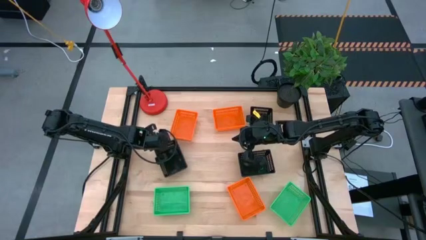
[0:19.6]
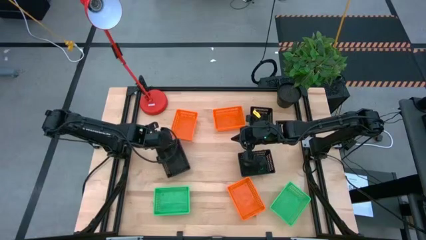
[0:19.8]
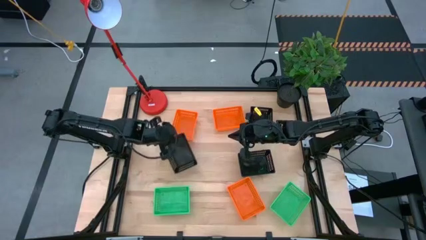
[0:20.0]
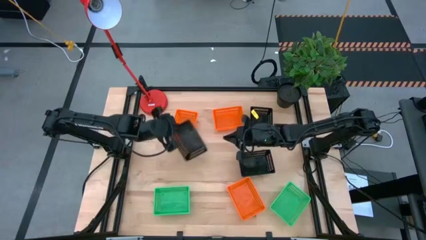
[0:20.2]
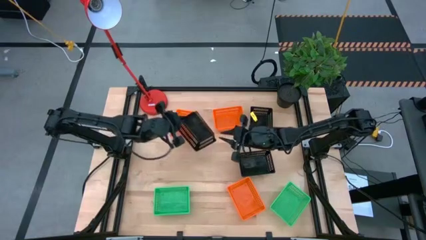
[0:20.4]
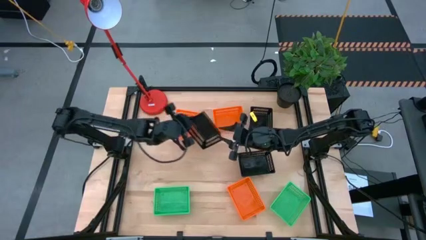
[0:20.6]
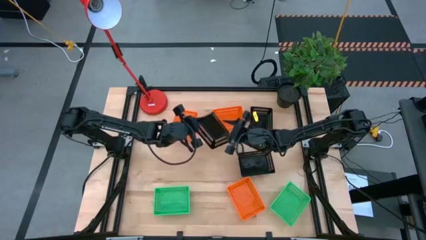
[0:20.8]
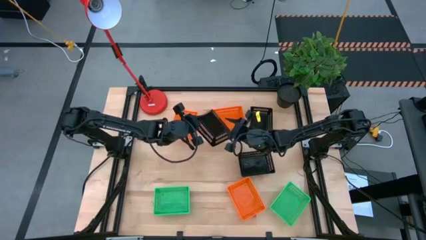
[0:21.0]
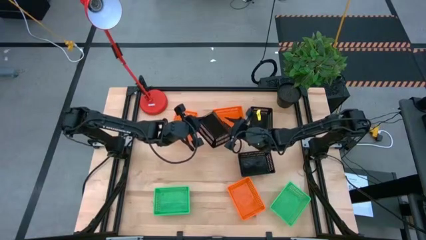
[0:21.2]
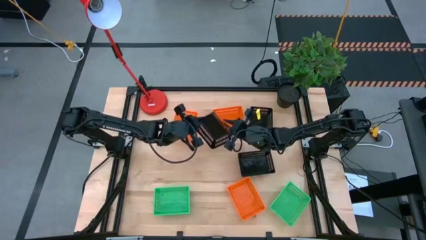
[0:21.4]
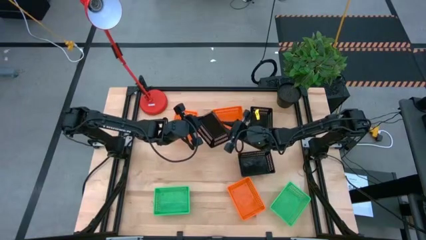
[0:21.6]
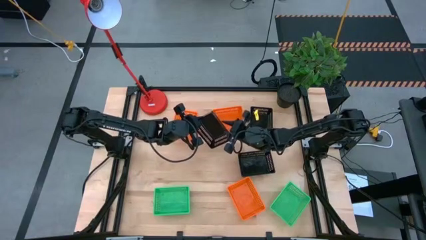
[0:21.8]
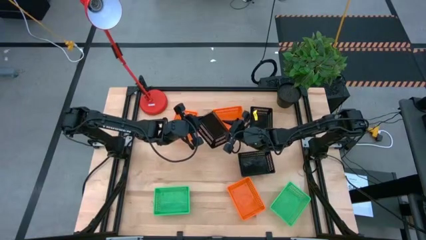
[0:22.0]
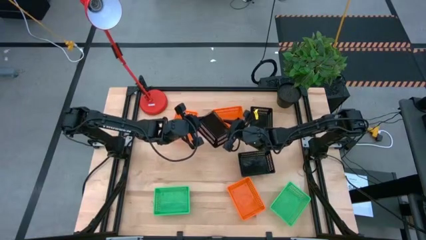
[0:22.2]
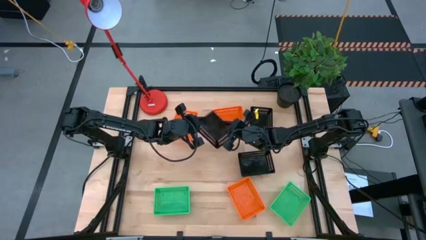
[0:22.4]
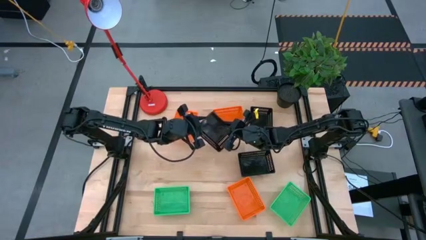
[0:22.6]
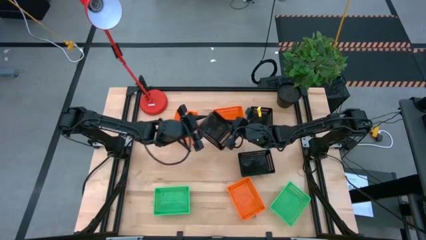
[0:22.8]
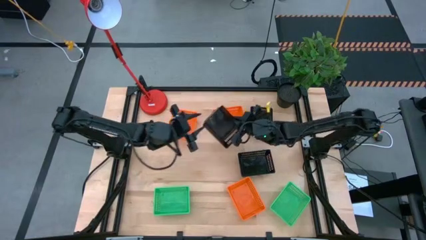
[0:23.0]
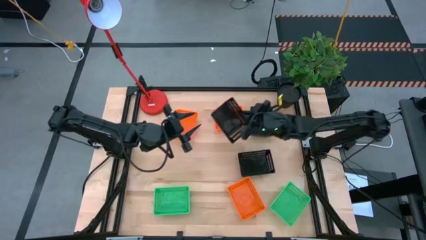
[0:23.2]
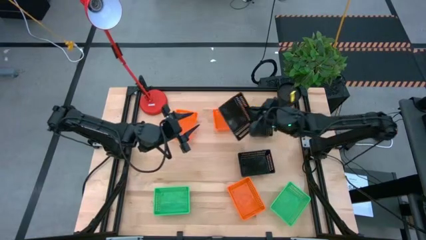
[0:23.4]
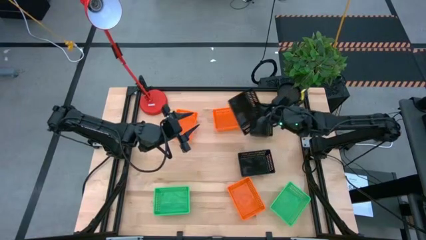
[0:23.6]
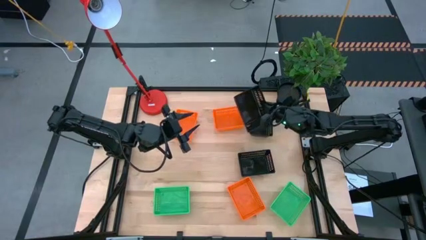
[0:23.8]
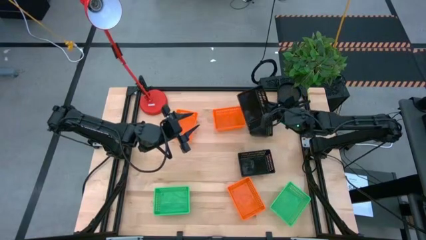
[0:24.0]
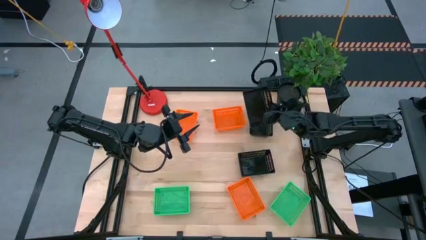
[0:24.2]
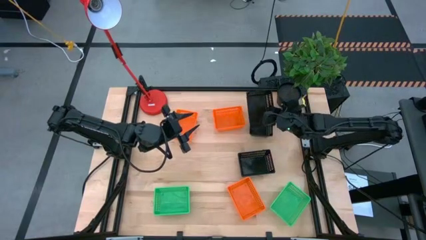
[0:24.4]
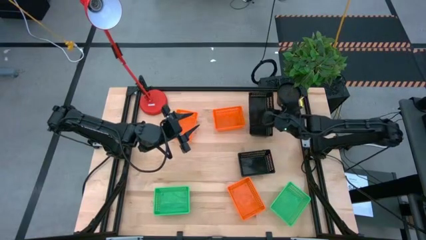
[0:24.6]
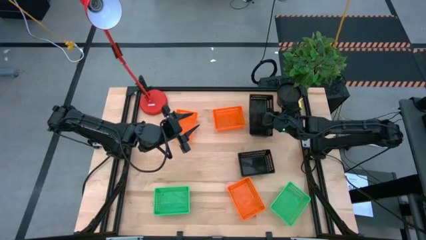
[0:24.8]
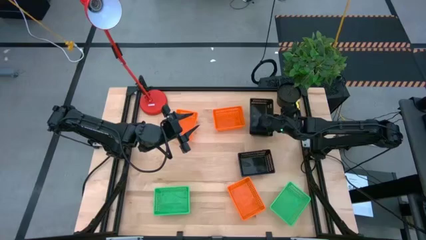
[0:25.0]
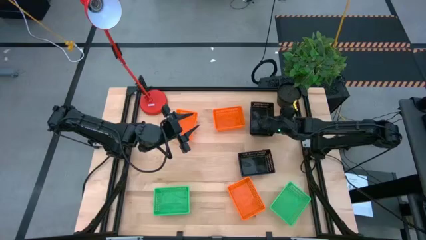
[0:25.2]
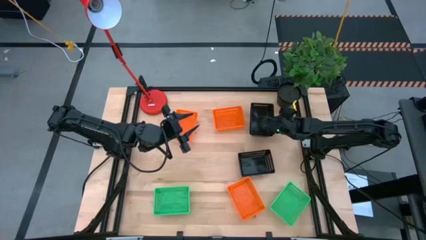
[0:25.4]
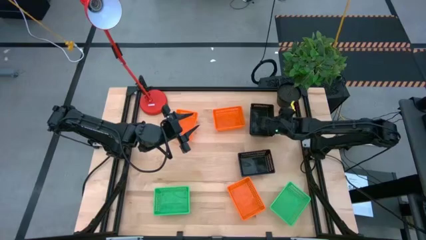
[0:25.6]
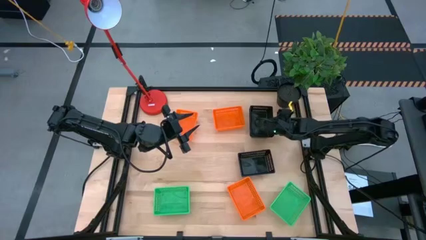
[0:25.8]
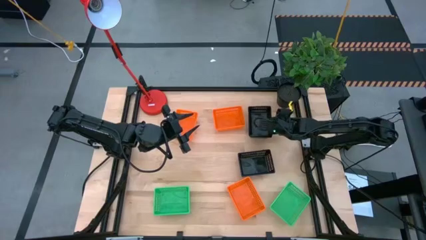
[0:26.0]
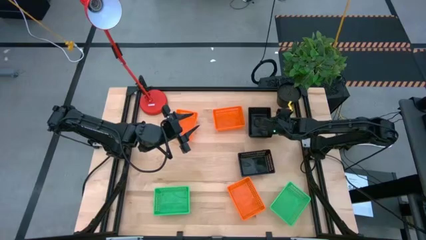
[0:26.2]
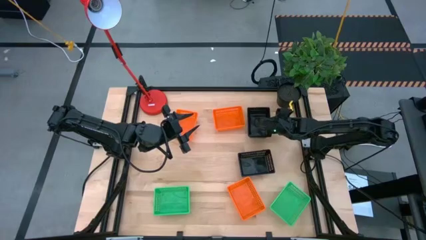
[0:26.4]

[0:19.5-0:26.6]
Stack the left black bin on top of the top black basket

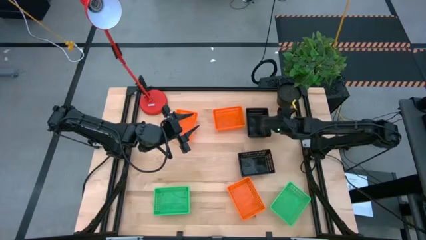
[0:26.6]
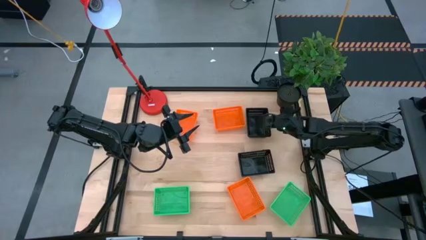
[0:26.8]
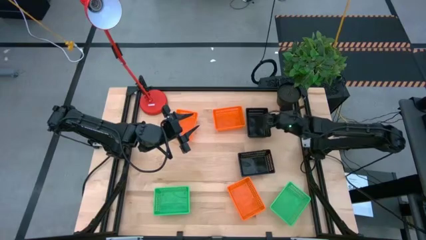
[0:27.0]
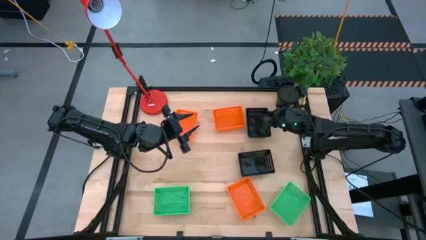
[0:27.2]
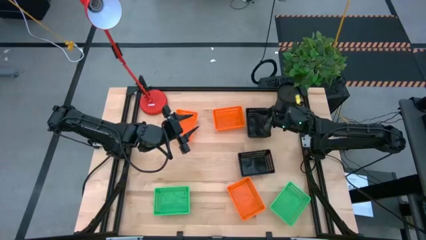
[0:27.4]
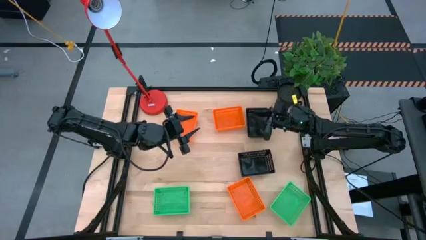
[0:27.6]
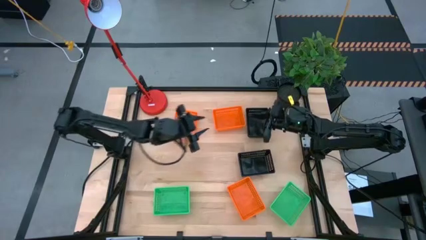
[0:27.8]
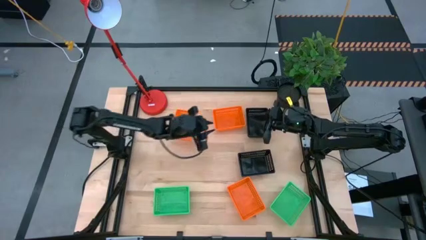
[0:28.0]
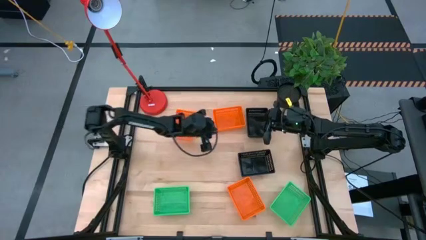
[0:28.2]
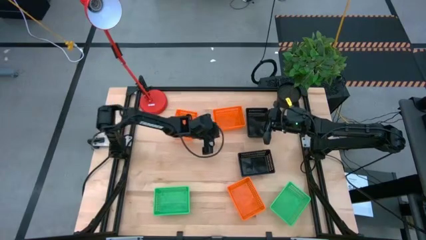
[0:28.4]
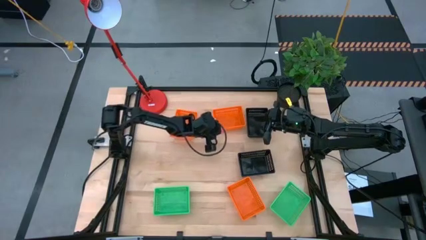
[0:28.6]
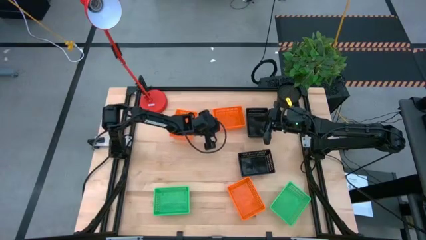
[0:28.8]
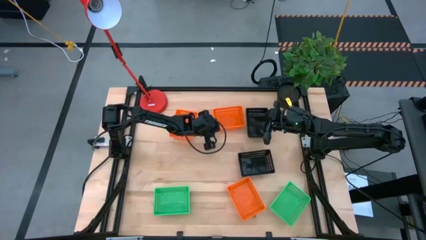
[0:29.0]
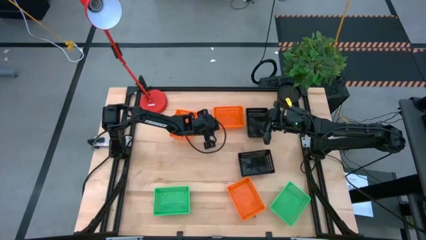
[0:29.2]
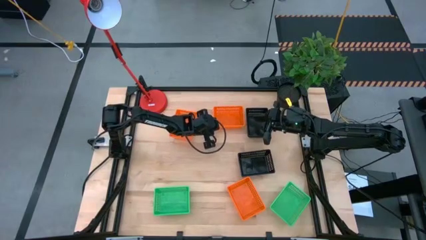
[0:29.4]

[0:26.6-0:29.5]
Adjust the middle orange basket

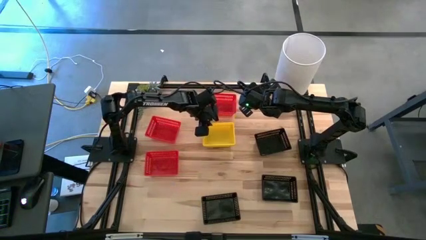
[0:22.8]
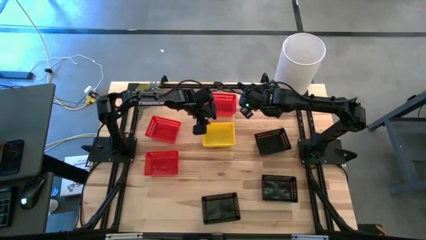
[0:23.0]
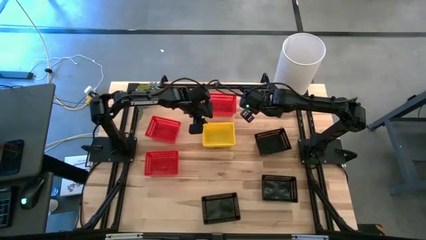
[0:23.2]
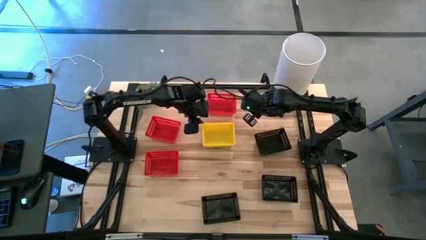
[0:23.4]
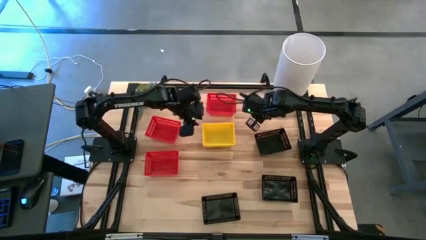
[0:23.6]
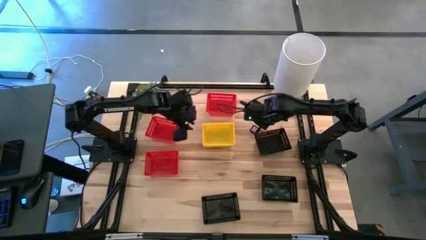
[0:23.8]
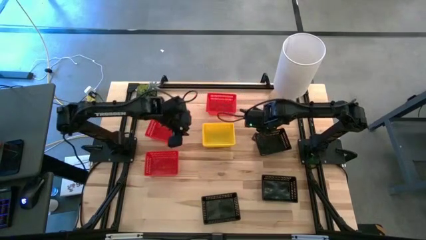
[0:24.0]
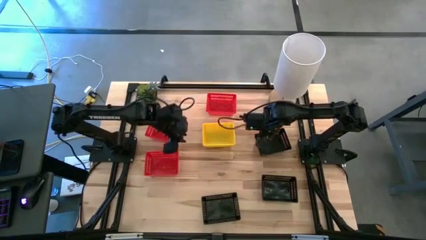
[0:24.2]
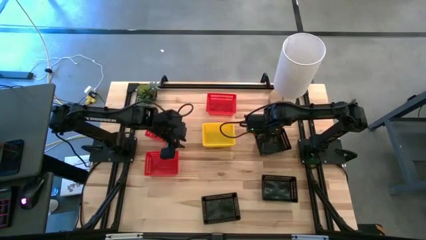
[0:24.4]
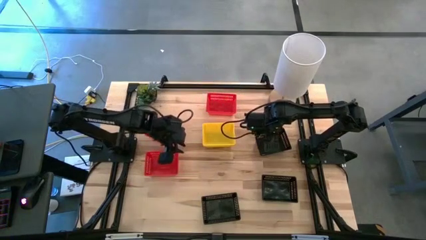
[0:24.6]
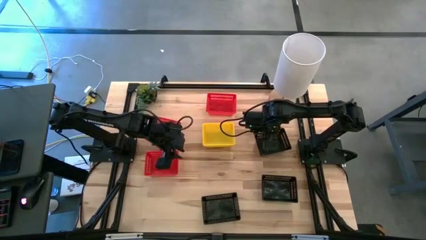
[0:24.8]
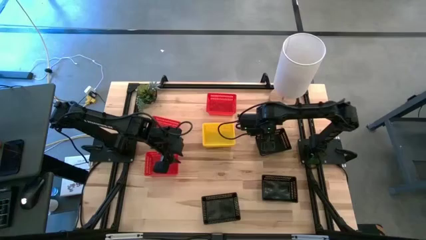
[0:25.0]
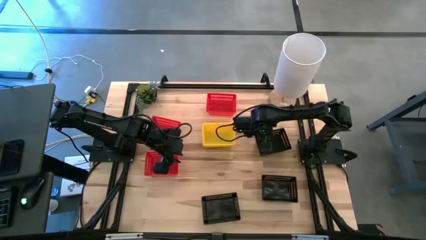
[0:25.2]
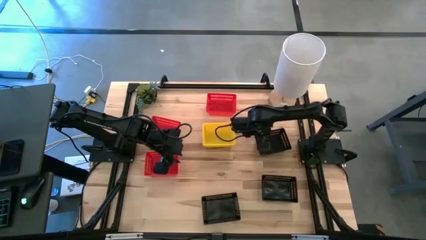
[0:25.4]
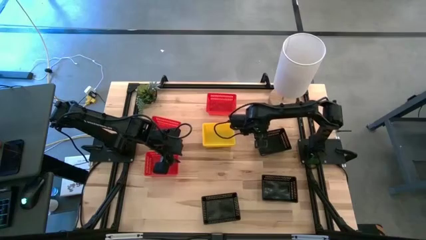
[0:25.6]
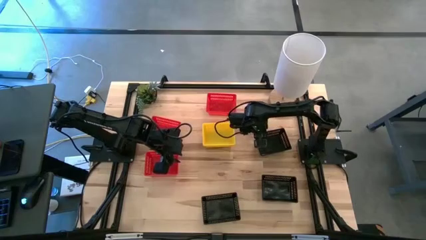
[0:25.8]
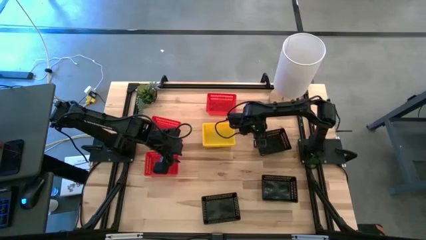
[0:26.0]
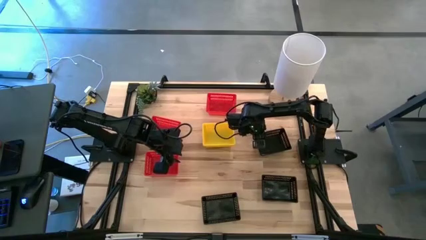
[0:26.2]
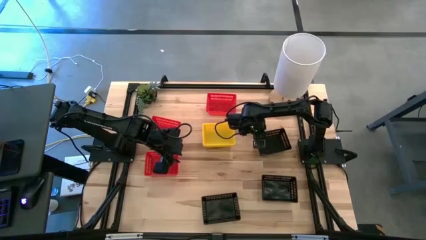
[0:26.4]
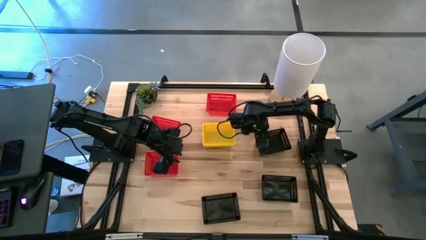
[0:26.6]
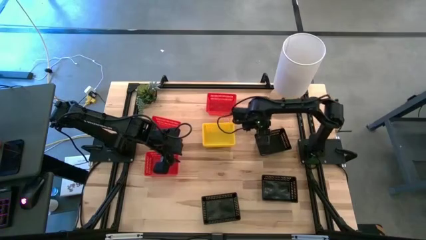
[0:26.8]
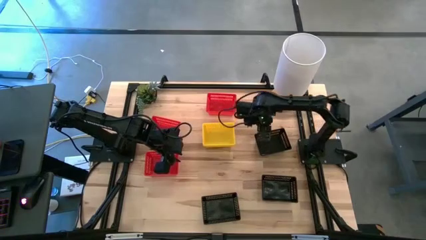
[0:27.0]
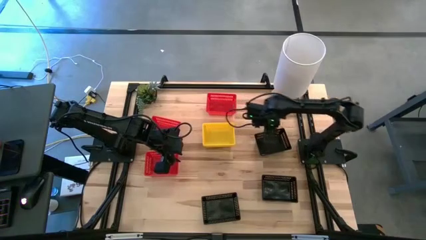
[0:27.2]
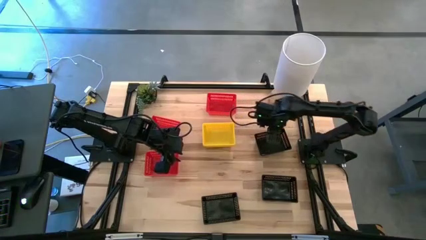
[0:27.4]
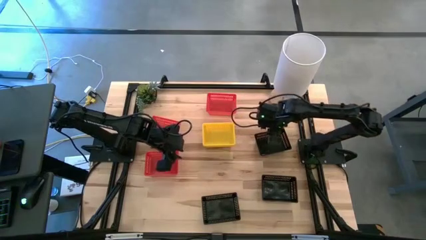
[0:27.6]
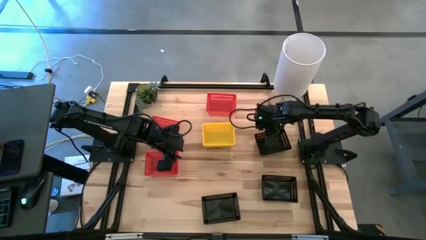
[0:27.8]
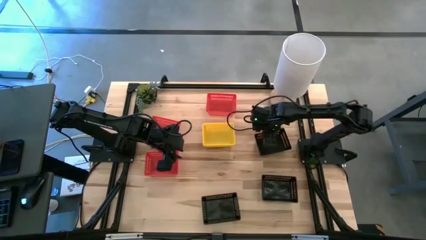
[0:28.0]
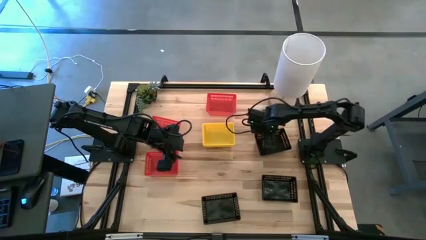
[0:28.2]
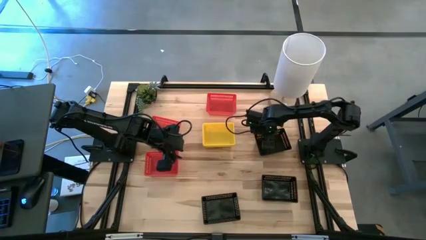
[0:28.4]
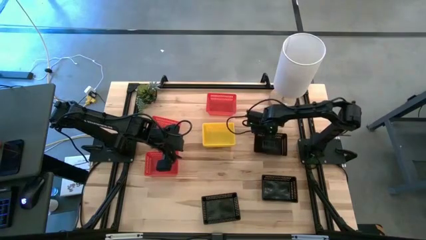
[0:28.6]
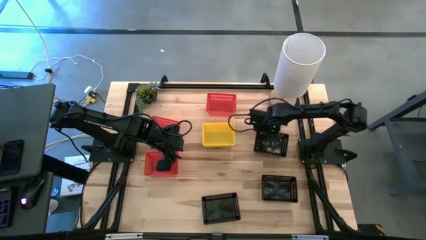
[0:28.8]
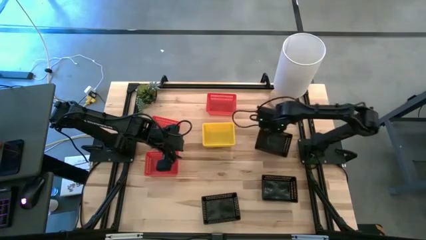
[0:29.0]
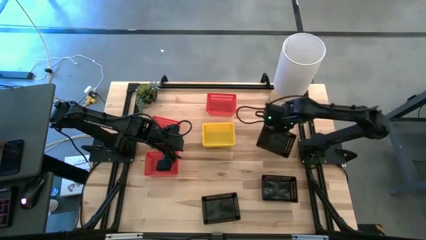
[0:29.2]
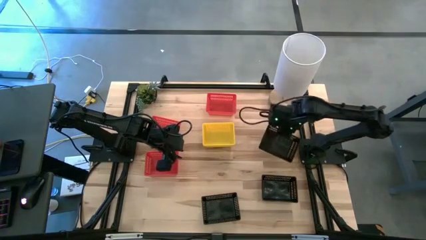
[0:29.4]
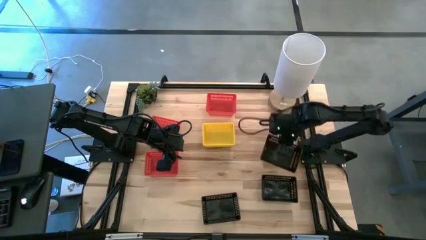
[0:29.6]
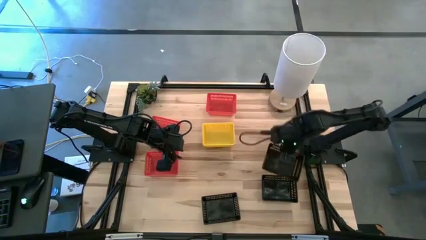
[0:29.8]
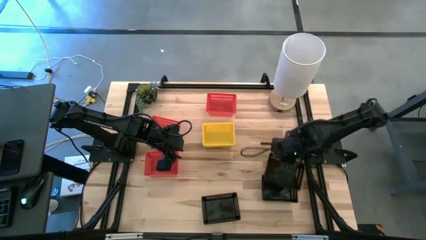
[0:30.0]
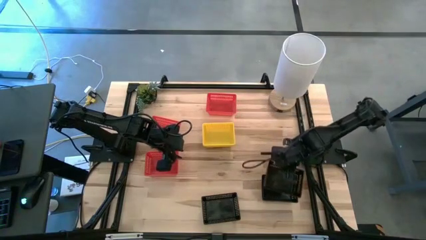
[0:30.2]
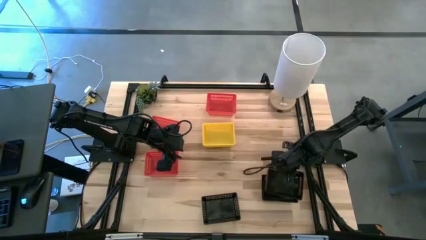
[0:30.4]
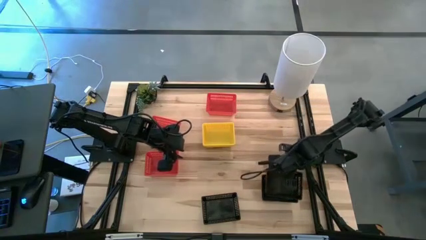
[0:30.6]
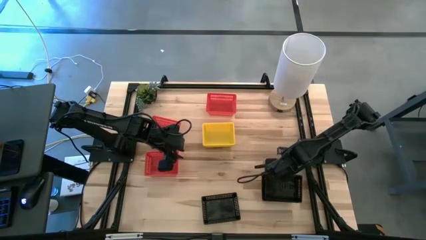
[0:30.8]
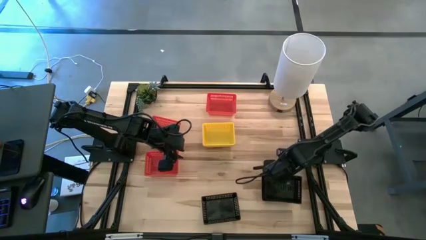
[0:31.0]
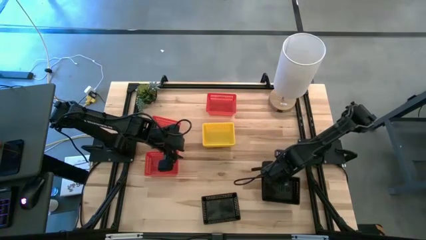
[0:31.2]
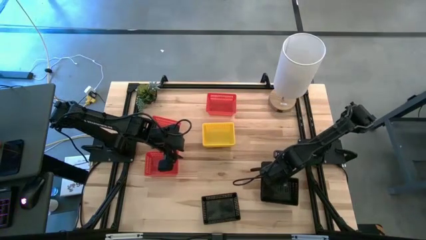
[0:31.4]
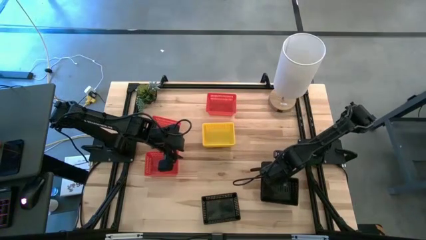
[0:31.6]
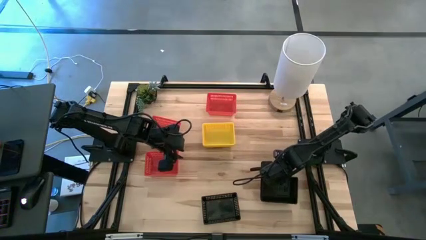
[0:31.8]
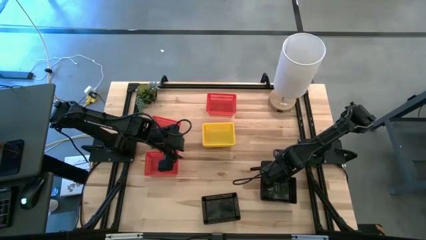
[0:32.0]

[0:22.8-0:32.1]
Stack the top black bin on the bottom right black bin
